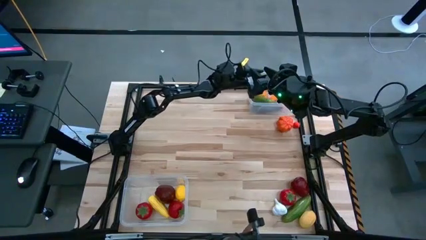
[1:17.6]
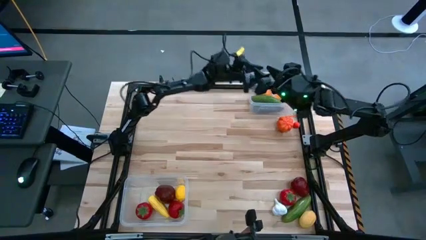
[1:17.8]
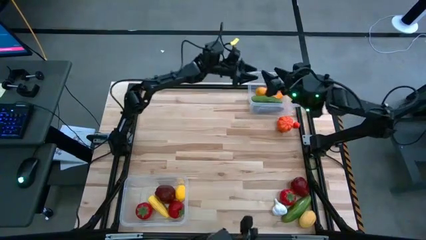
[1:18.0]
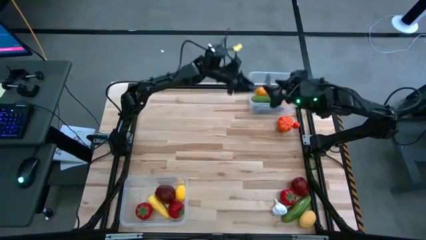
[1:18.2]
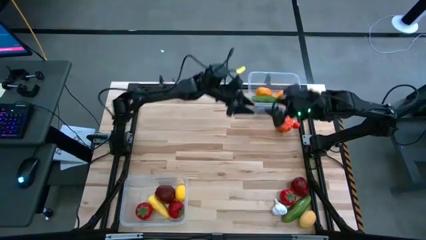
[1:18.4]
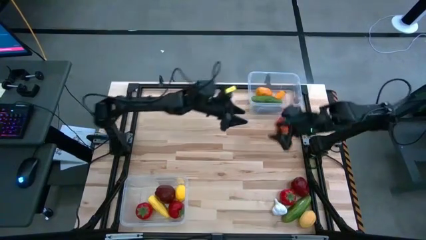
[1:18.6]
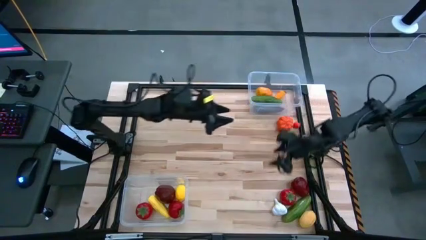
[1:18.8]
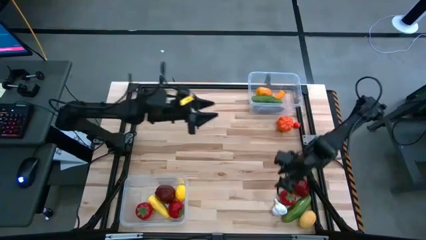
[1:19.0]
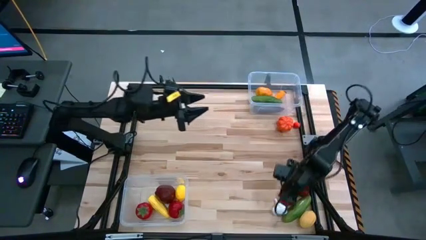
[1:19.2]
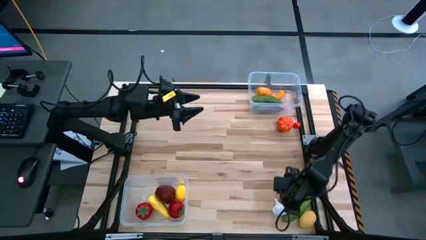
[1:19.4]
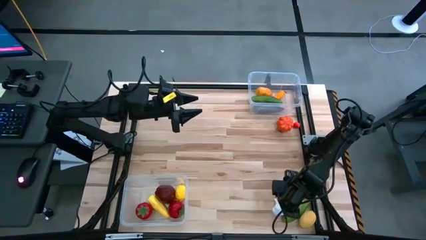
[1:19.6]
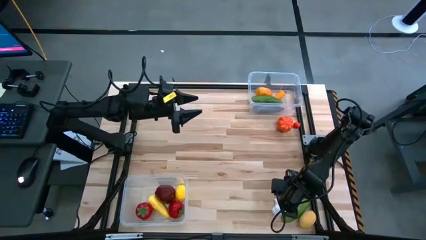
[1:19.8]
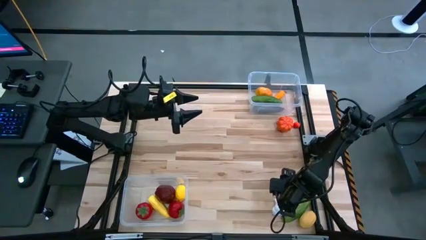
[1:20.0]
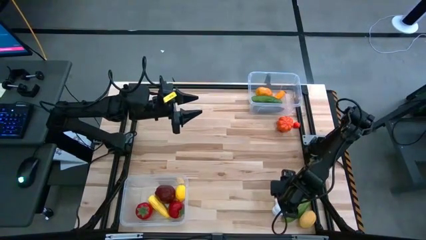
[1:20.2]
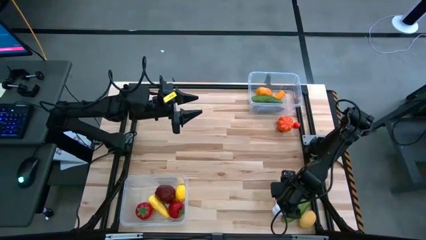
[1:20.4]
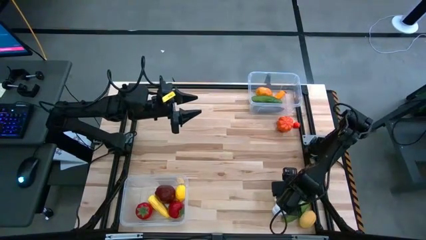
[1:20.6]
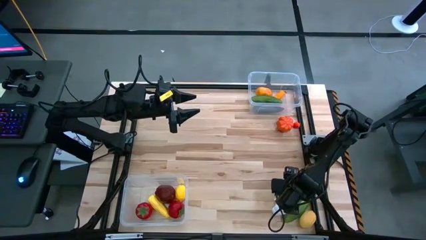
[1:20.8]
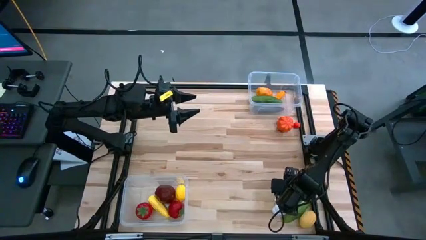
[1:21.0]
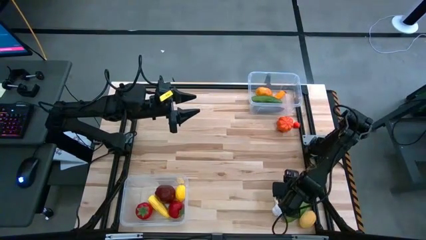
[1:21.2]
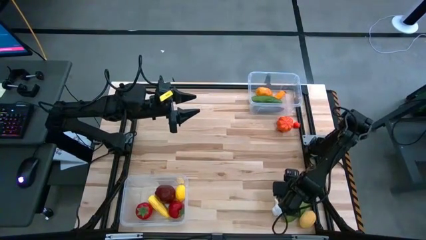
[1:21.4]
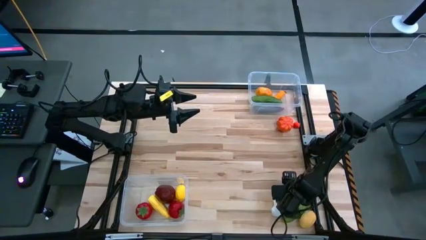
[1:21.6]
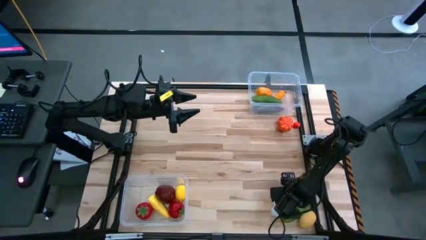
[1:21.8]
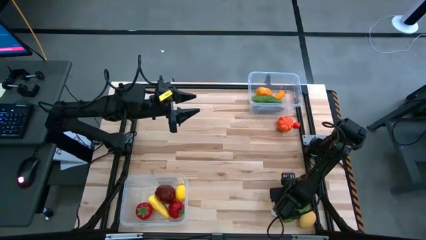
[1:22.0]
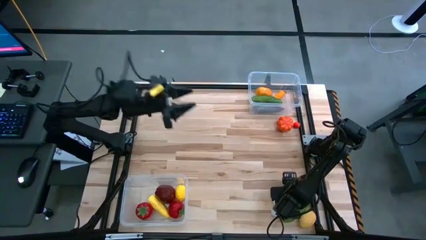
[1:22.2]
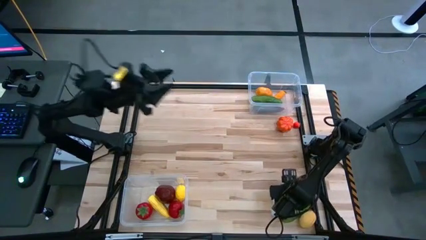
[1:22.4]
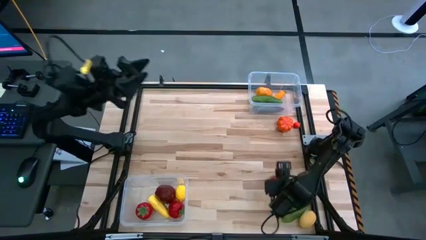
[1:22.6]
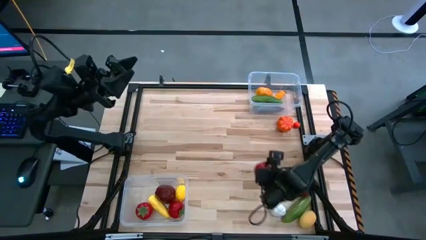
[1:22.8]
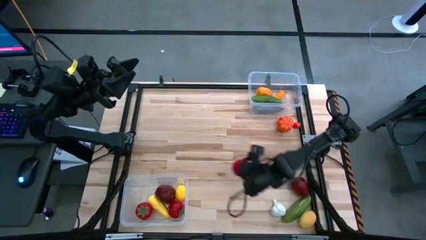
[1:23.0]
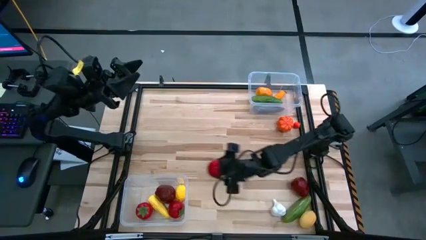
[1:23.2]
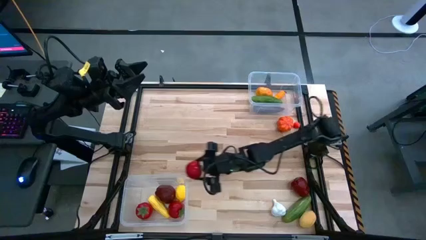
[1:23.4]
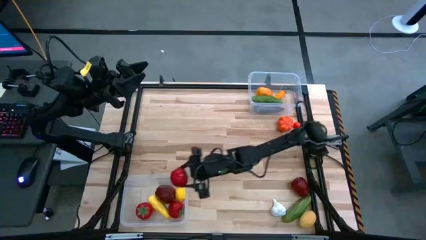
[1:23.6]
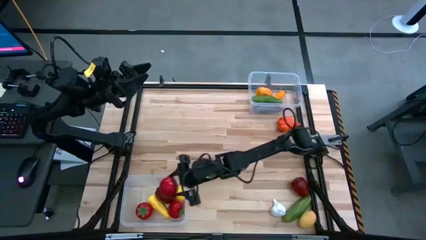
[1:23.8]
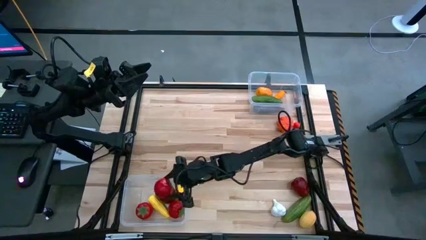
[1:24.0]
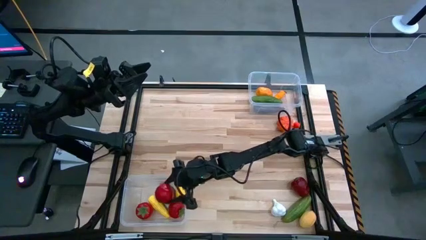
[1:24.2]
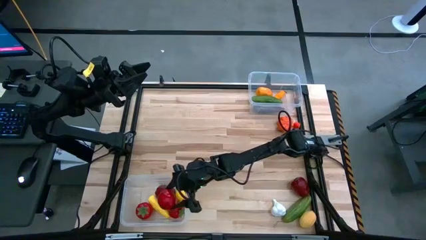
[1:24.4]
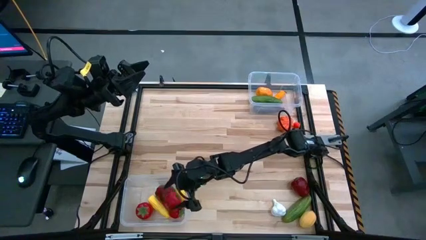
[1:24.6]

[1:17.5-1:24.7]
Task: Sort produce into baskets
Put the red tomato into the bottom transparent bin

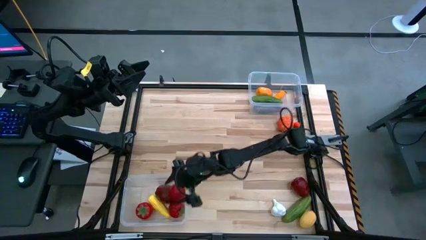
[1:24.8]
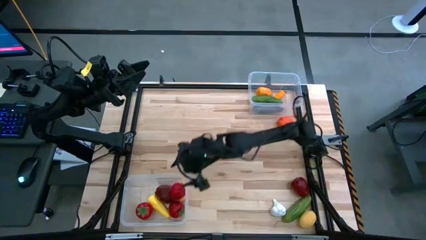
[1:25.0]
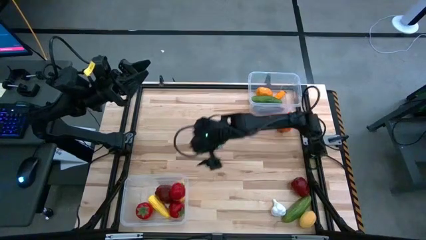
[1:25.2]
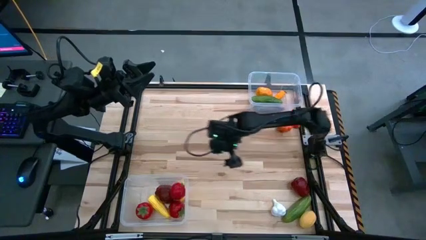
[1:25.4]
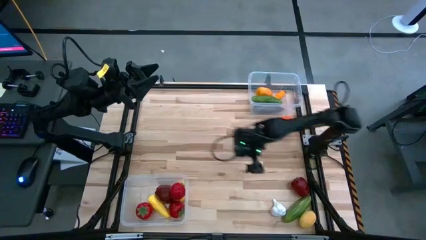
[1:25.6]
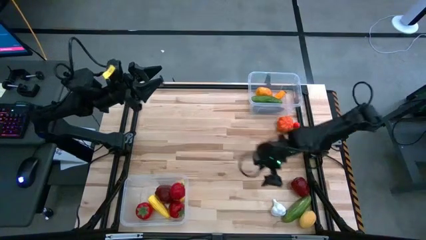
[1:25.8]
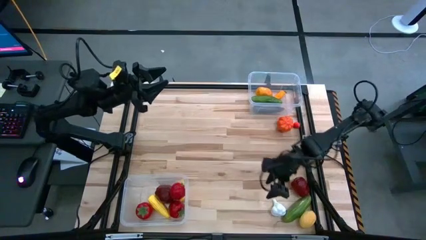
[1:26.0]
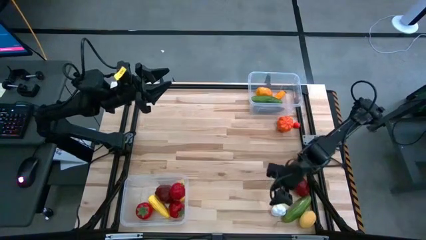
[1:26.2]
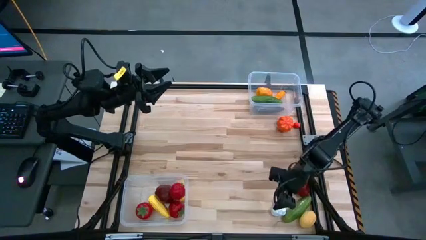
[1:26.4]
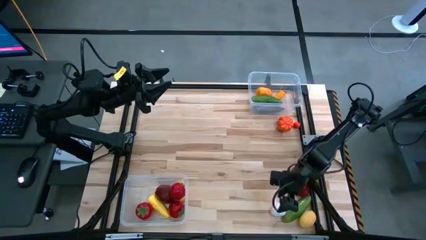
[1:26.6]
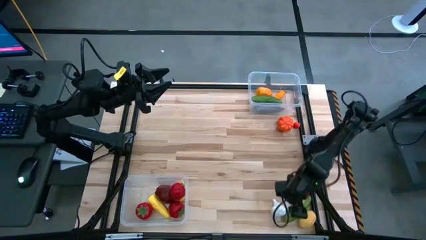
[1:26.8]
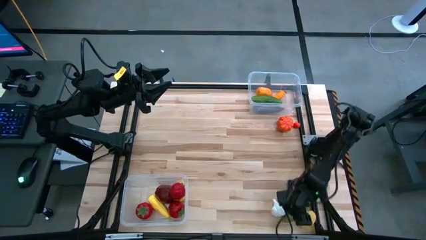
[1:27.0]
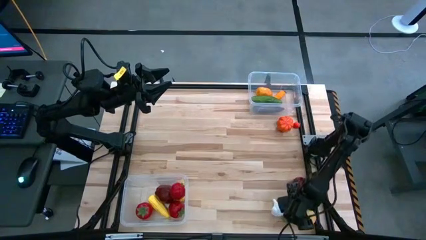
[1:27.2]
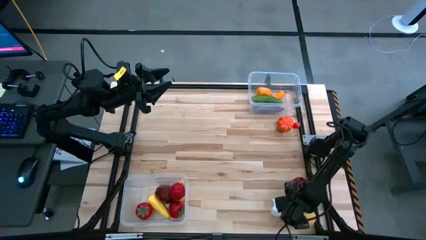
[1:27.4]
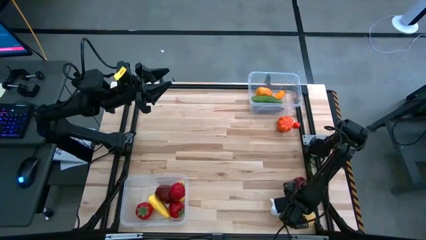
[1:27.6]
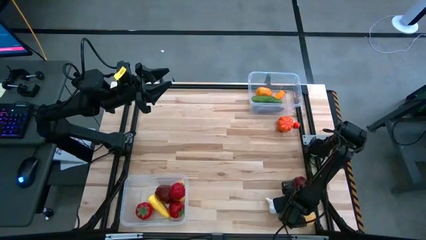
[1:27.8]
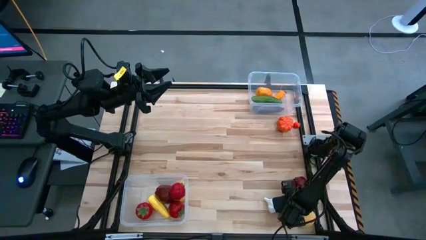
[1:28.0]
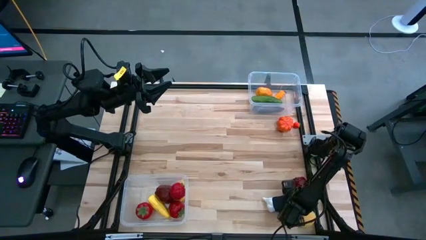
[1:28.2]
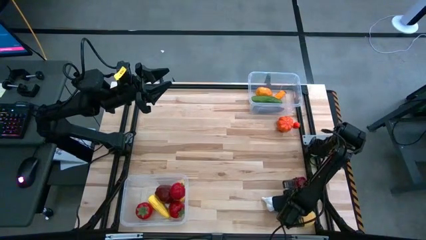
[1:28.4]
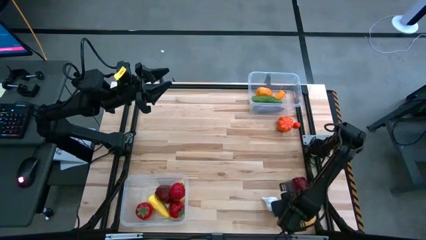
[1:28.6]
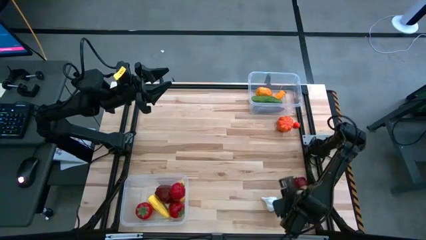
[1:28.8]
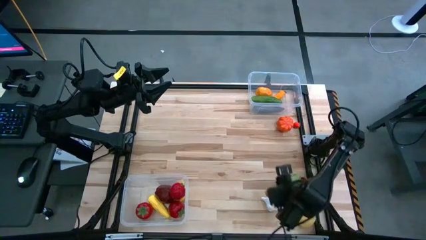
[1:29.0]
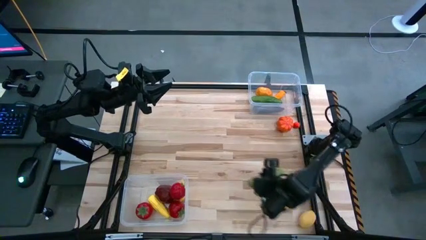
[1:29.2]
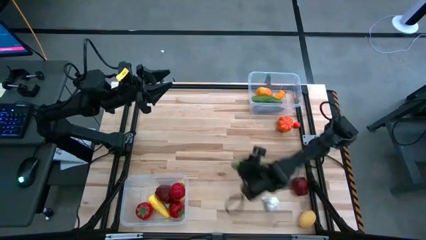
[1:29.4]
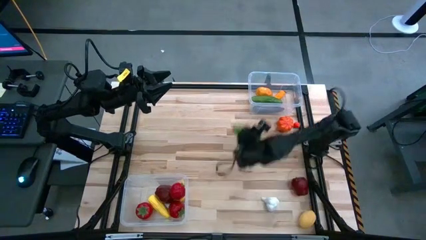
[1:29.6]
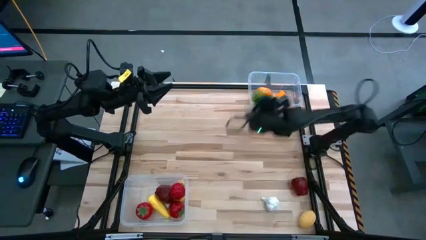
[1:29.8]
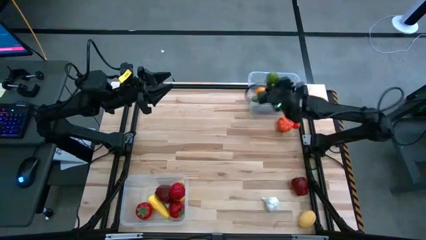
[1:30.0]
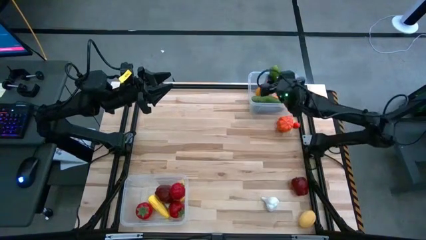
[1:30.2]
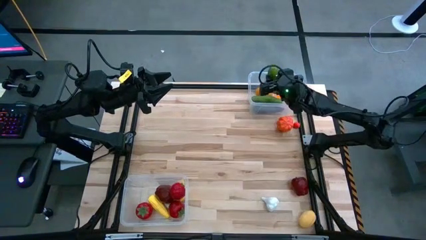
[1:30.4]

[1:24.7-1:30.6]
Put the green cucumber into the top transparent bin

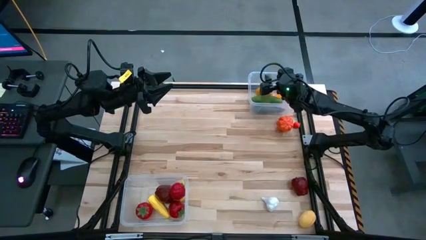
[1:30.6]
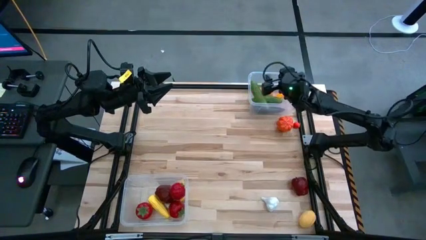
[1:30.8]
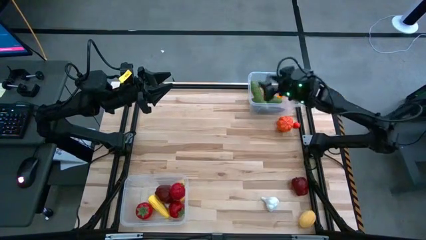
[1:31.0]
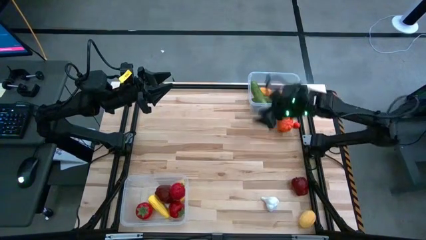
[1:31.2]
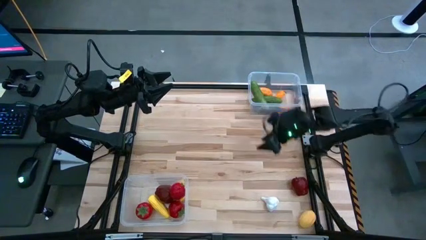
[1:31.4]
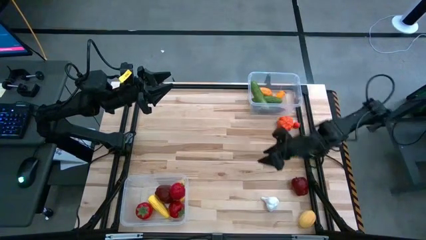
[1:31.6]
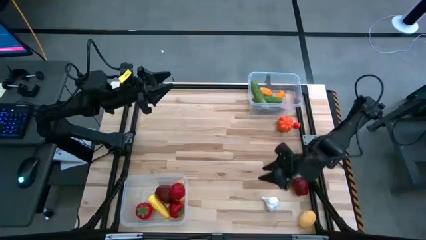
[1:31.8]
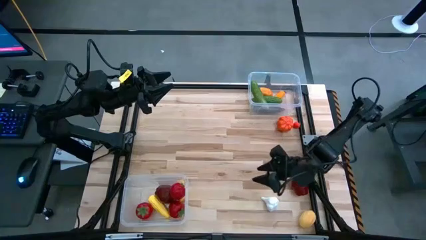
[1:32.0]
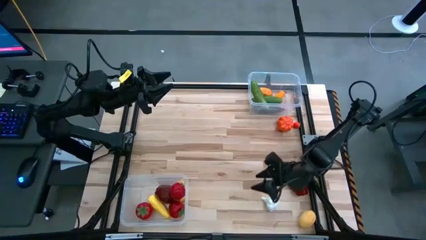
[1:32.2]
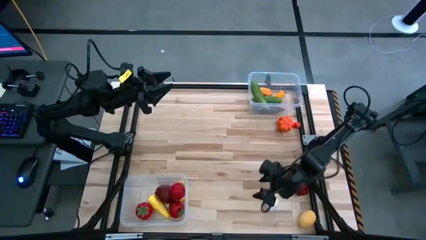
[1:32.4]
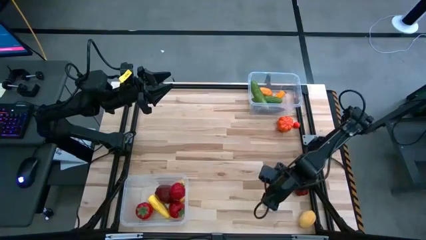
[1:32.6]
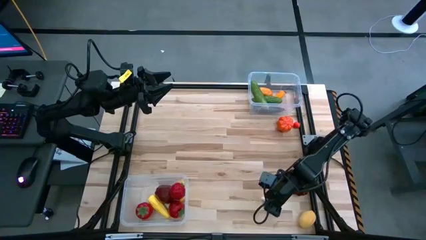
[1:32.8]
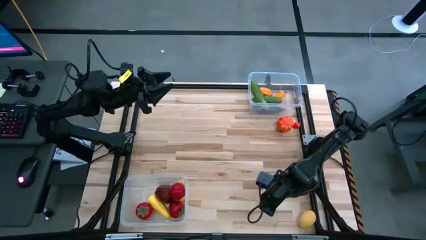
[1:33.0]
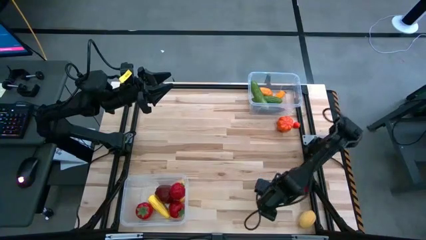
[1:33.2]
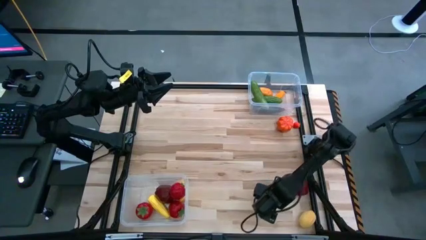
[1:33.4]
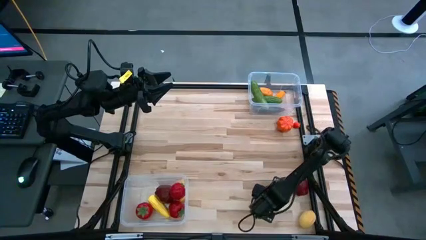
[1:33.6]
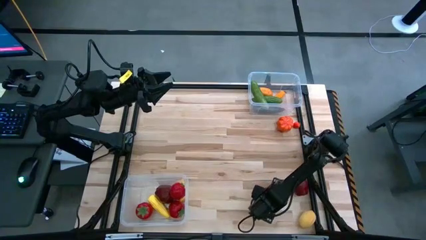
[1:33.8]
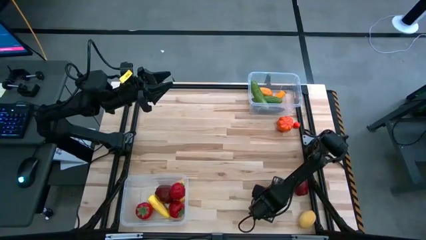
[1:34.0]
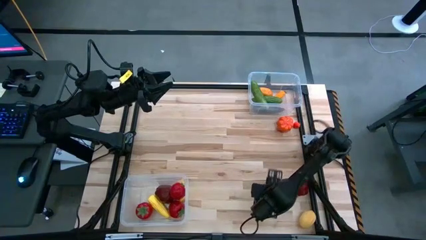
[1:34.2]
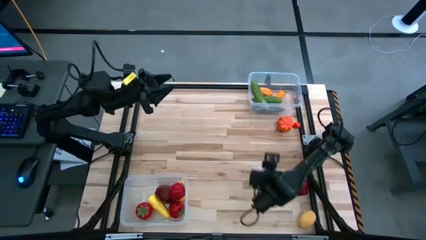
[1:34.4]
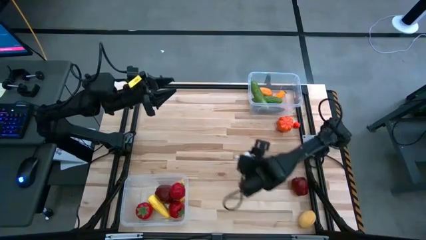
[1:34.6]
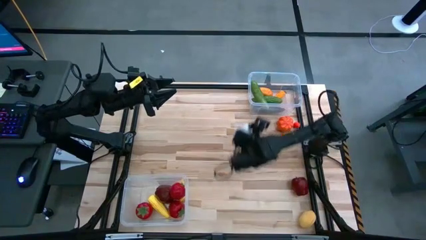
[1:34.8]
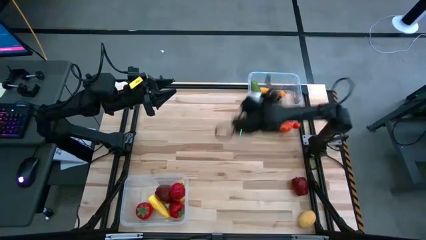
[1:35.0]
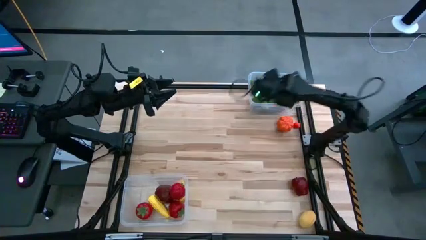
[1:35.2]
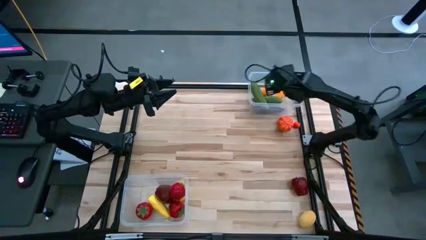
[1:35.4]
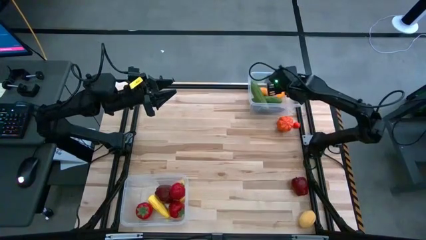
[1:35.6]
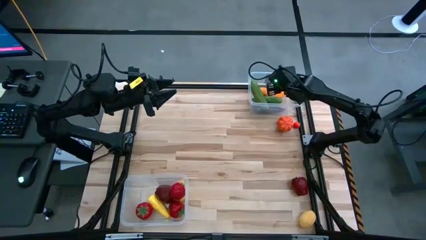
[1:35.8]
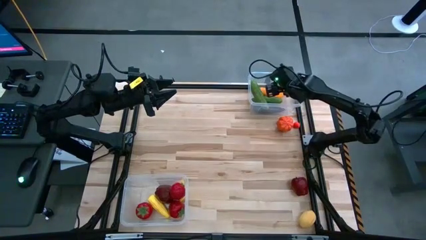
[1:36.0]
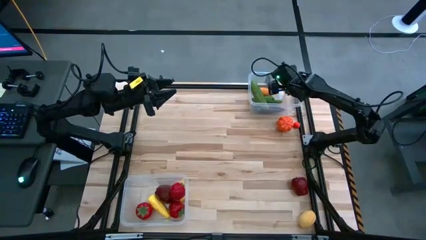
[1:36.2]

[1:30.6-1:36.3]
Put the white garlic into the top transparent bin
